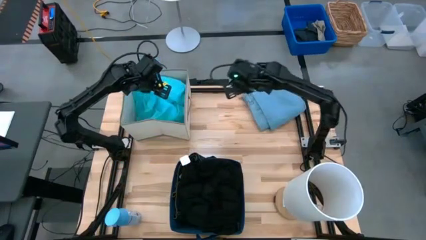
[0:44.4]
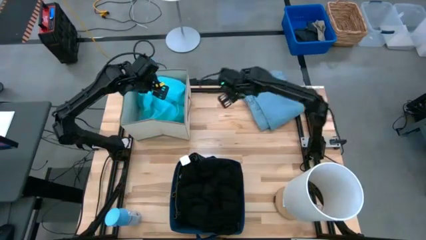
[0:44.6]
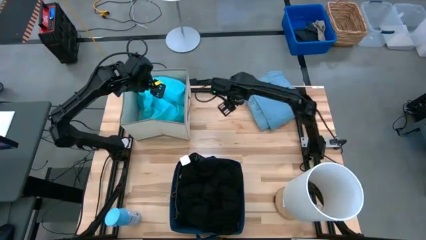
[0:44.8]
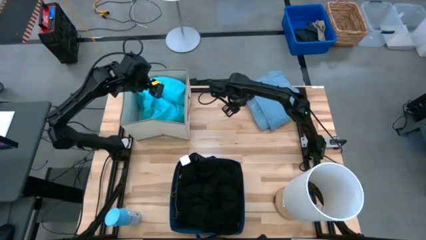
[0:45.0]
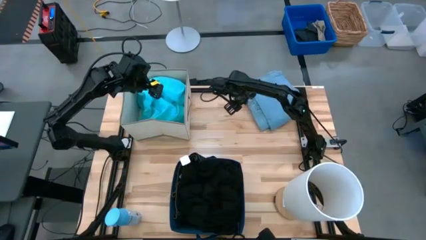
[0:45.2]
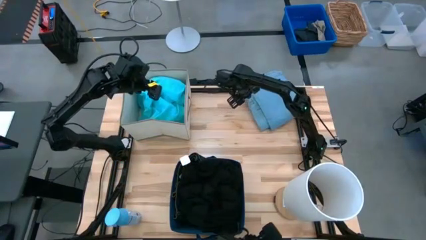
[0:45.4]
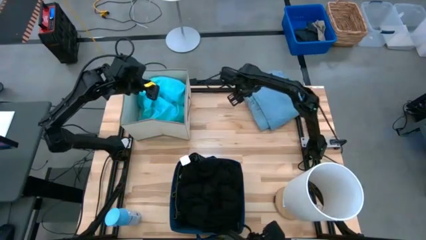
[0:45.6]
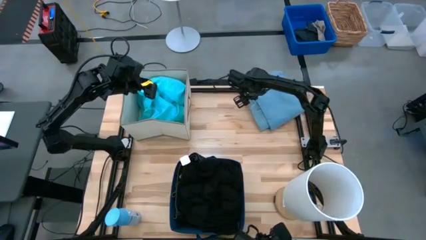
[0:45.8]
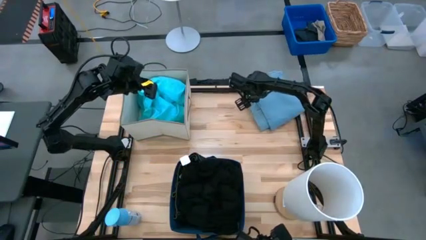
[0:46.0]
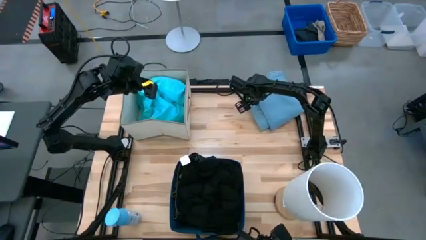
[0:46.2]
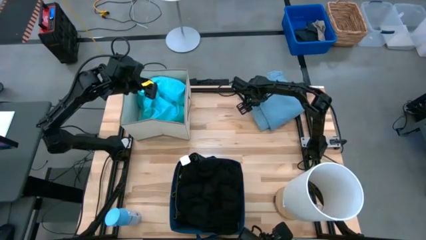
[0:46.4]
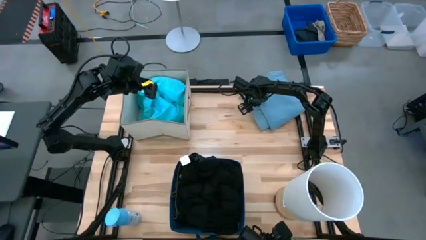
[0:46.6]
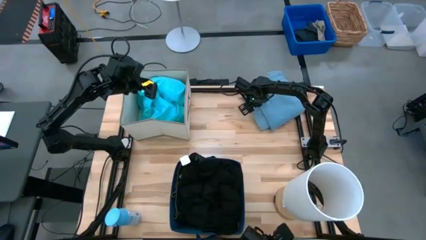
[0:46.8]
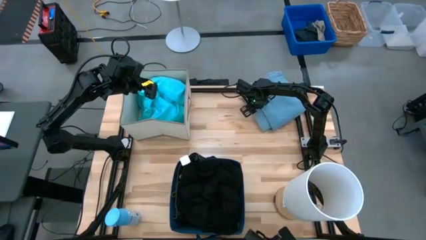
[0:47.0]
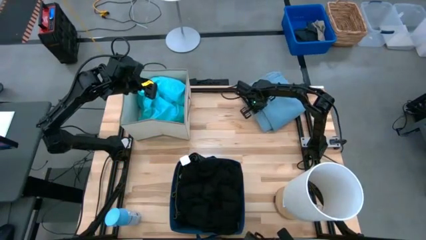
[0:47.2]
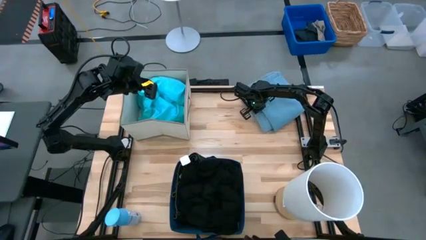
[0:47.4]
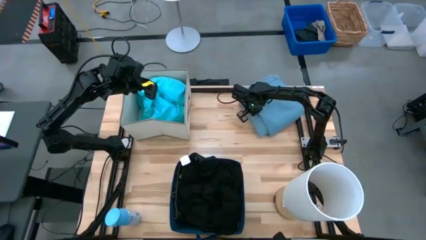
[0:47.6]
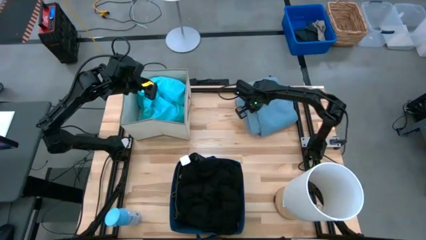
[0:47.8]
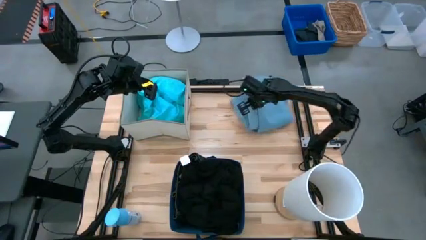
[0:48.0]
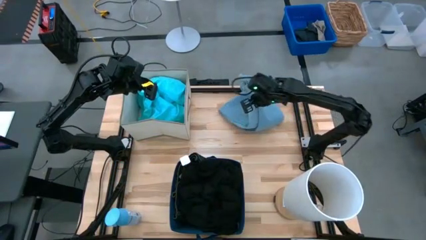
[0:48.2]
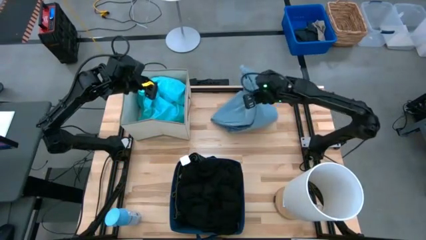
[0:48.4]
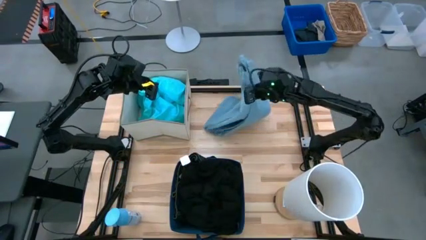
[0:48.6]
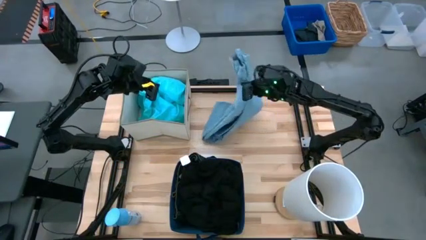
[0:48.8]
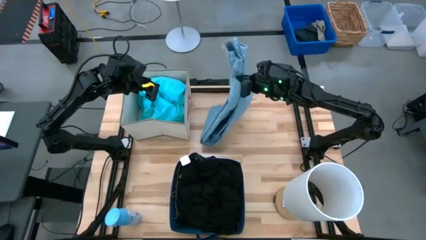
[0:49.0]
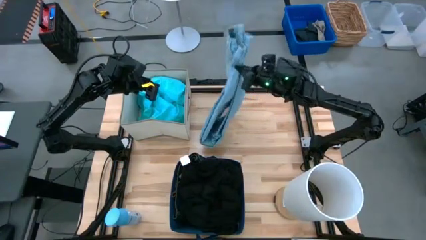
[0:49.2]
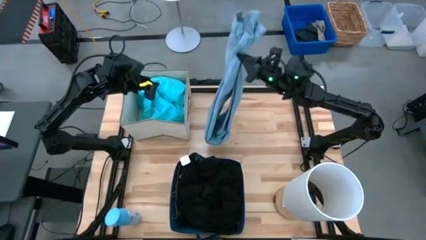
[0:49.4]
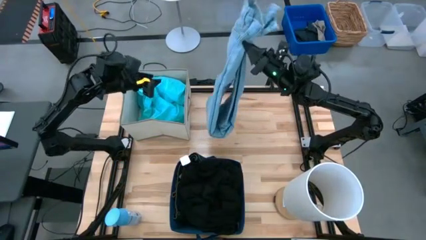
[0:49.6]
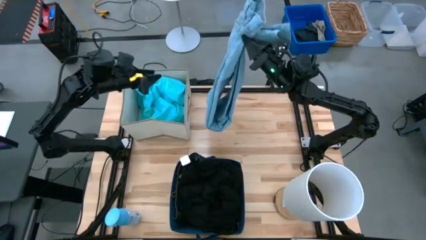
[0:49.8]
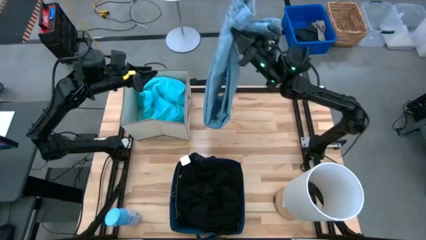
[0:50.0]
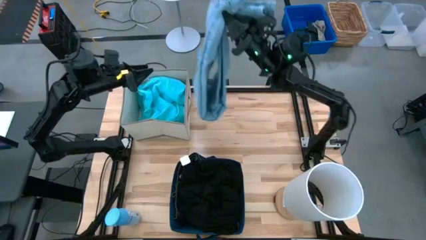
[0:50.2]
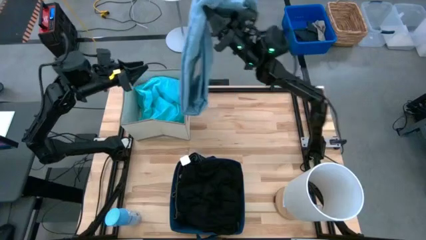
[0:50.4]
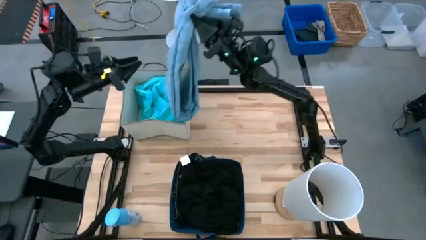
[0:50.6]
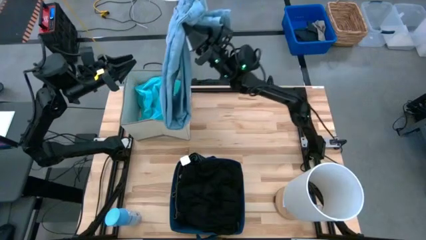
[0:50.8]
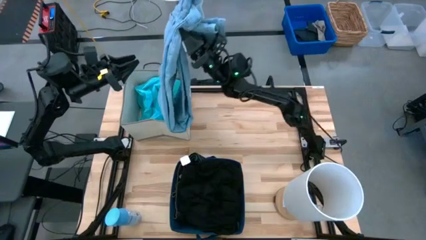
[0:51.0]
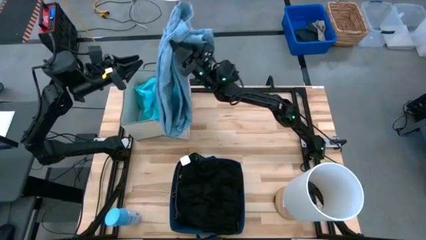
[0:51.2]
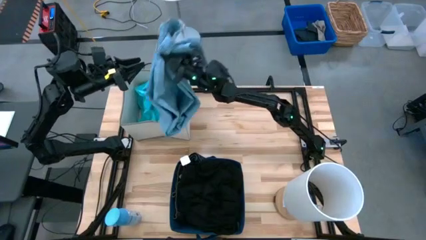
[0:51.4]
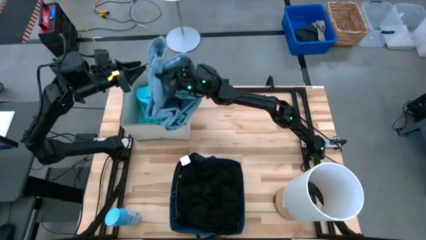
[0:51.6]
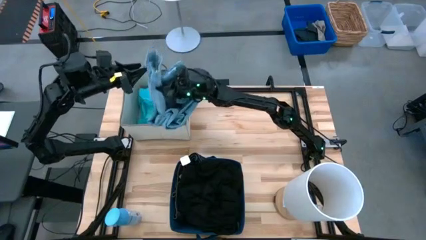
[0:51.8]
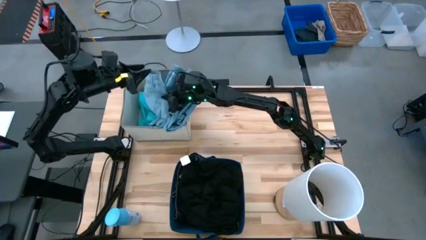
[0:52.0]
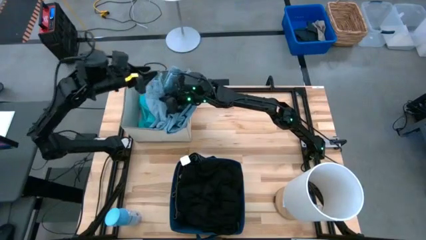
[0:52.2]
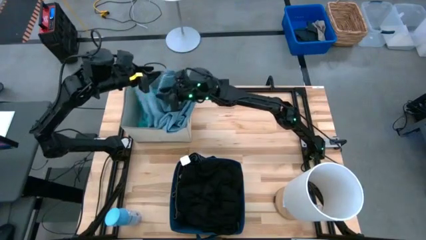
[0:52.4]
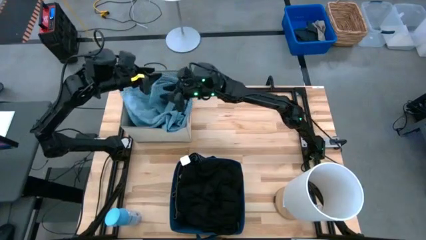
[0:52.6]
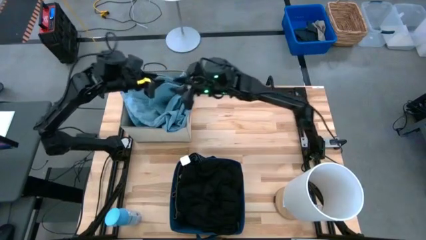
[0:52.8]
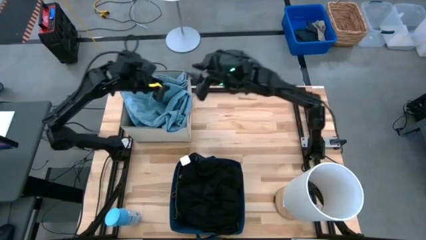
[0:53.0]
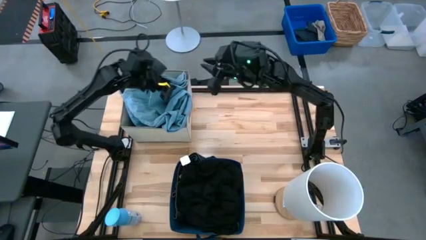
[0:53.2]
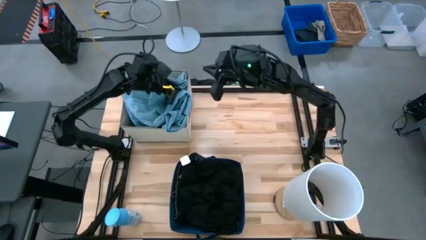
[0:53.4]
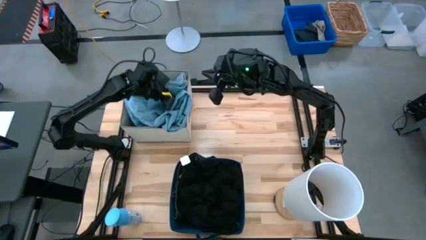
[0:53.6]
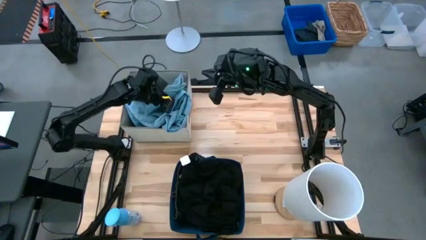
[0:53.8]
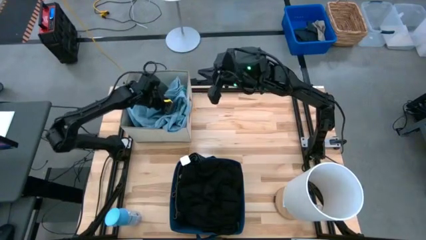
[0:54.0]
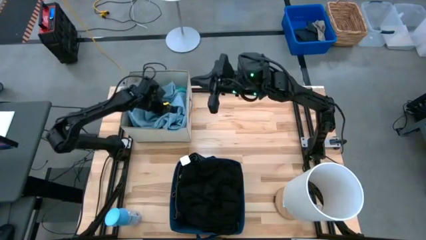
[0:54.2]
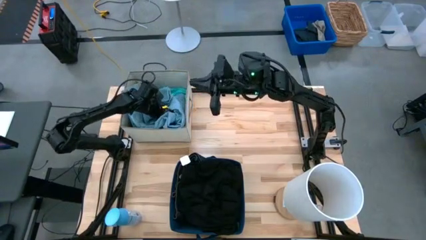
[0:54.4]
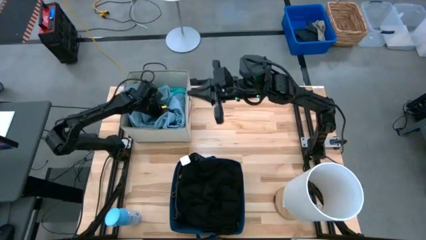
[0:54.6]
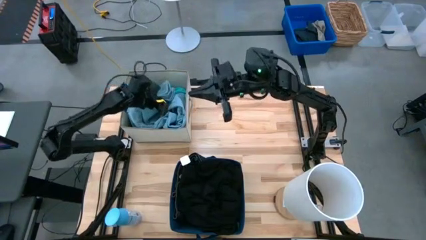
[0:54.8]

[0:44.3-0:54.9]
Task: Sort clothes
Put the blue denim jeans into the white laundry organizer

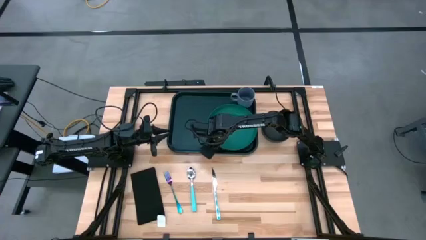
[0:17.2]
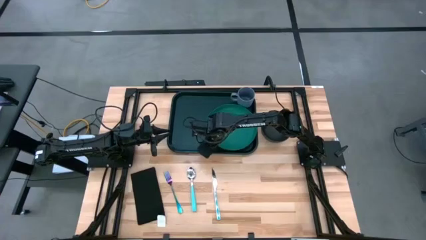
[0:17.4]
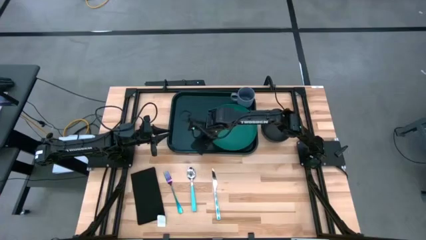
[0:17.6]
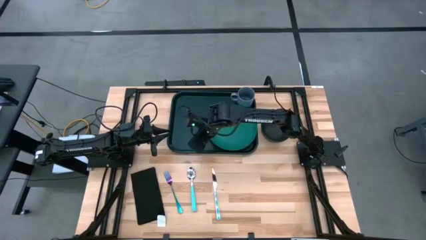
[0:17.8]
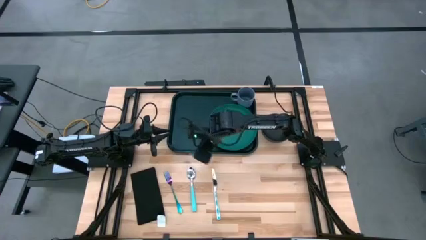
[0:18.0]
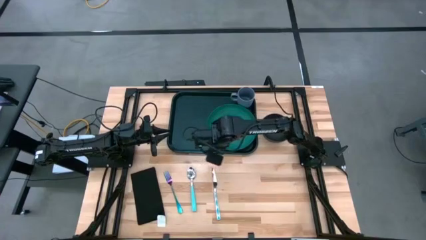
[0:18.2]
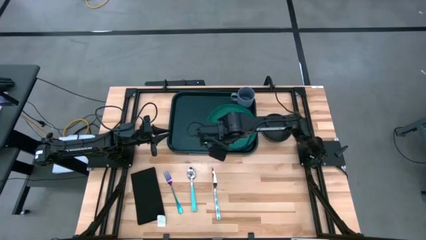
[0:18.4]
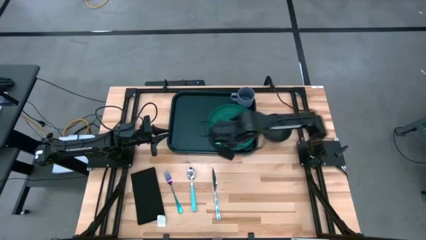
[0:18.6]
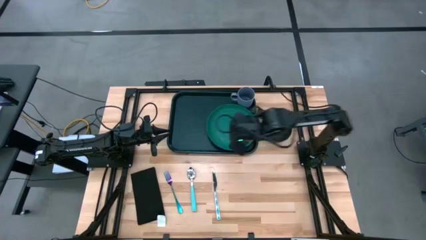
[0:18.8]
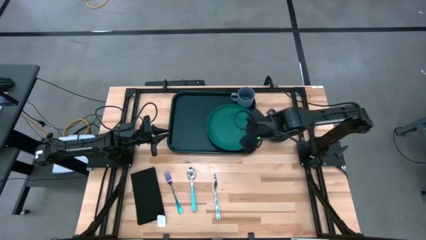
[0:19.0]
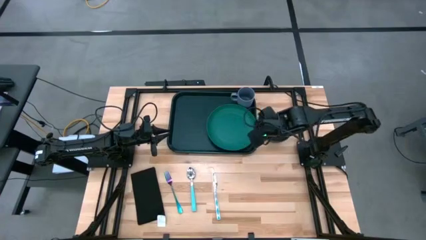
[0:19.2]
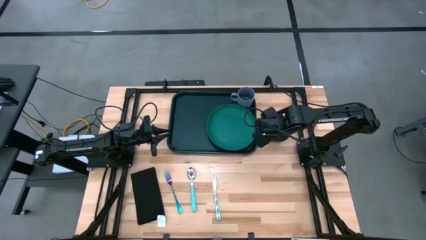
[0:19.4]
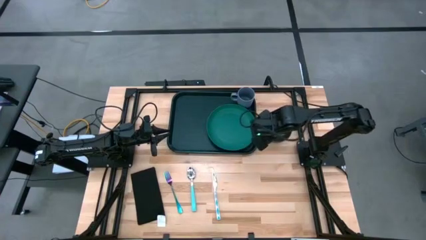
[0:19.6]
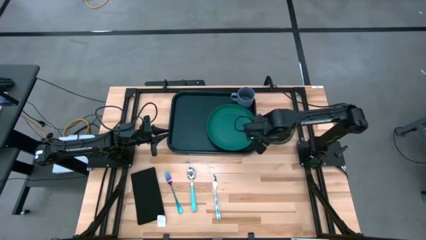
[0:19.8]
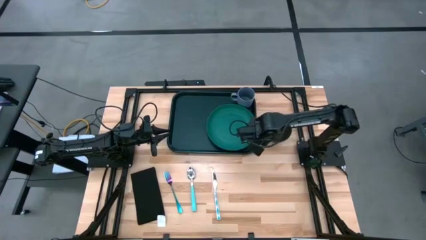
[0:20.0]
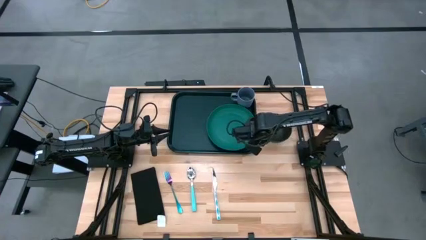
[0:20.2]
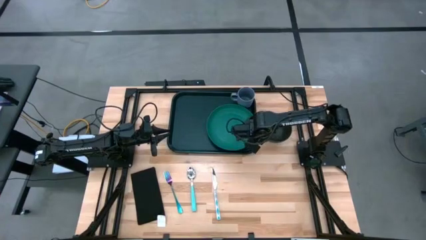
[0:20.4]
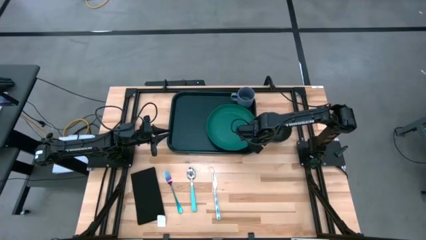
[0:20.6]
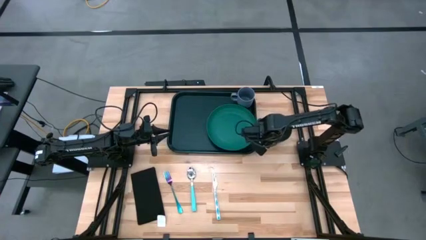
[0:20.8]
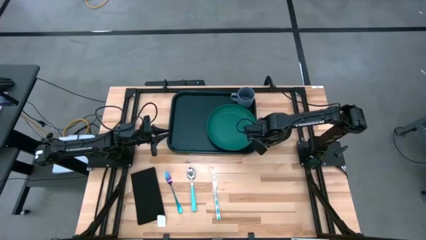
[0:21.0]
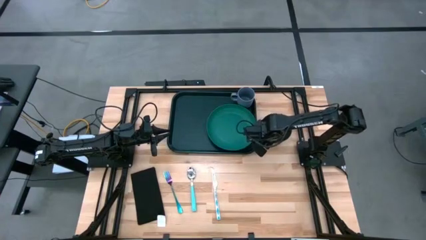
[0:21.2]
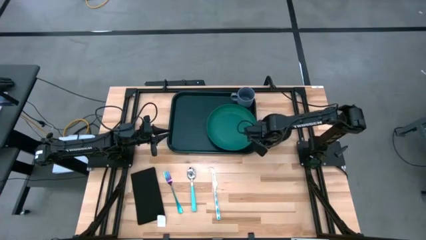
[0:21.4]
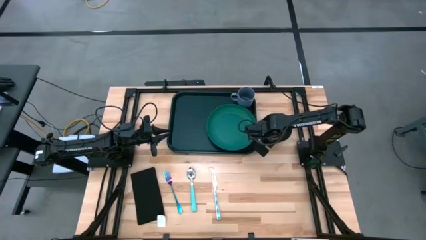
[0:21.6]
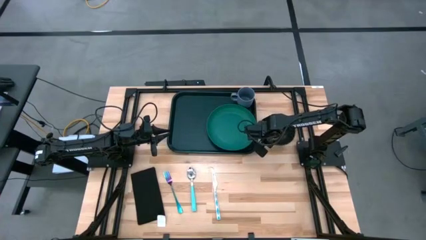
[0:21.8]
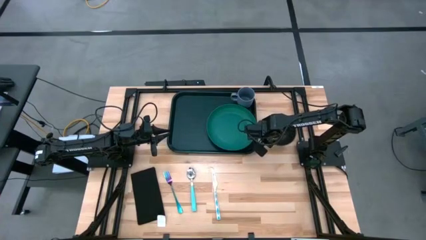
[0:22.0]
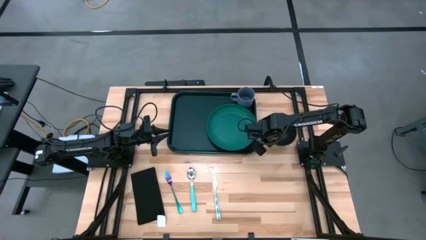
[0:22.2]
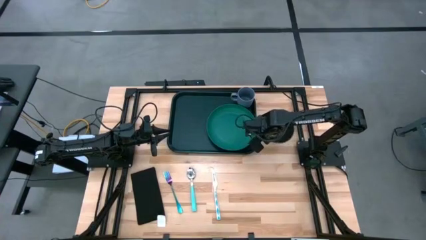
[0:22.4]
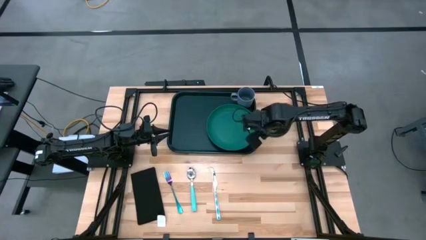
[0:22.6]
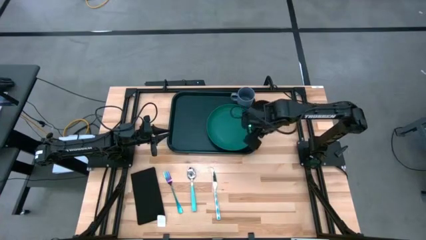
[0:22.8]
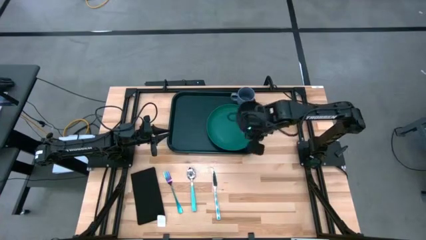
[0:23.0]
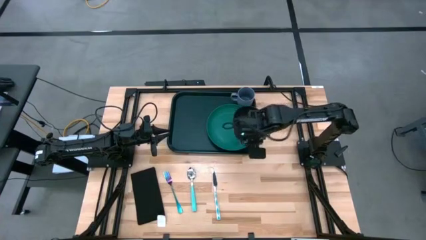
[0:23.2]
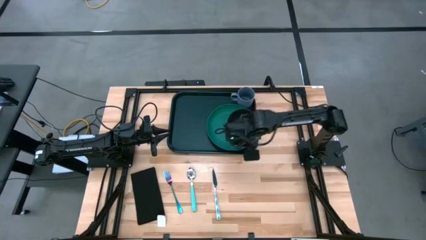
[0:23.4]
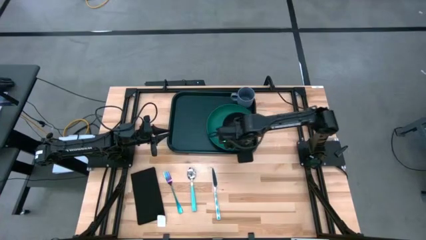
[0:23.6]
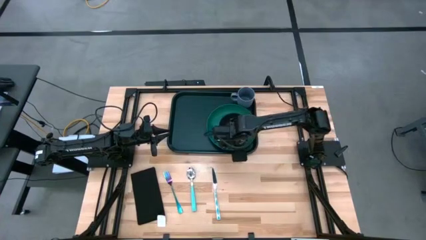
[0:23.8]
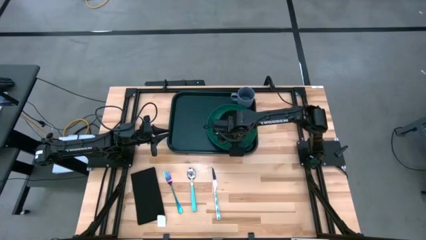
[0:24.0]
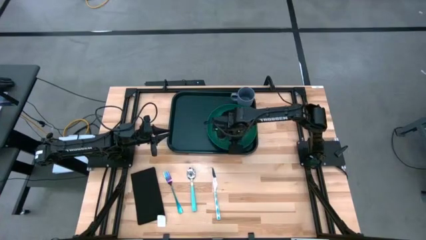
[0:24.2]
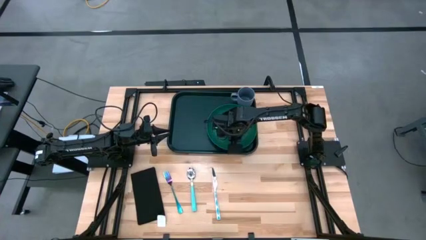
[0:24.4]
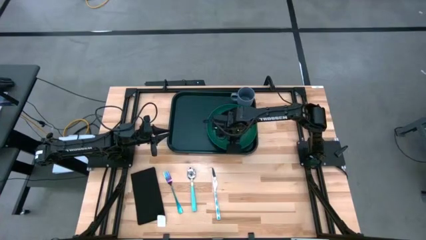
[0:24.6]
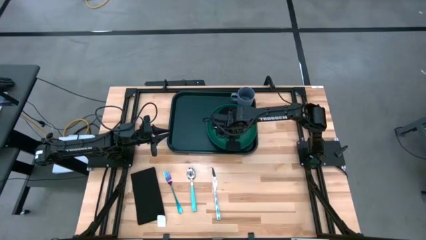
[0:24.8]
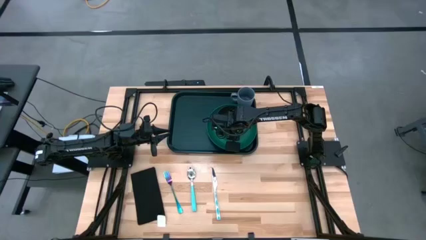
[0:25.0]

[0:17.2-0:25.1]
Task: Set up tray
Put the black bowl on top of the green plate
